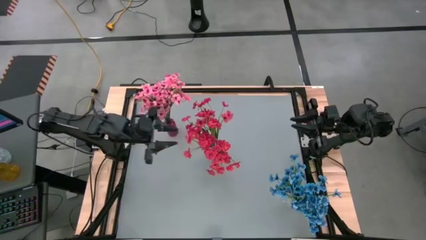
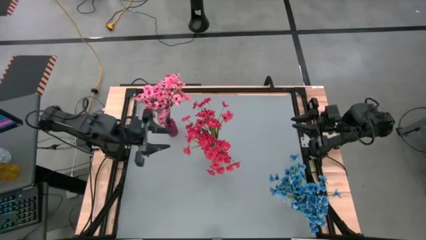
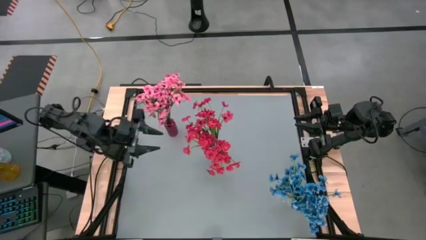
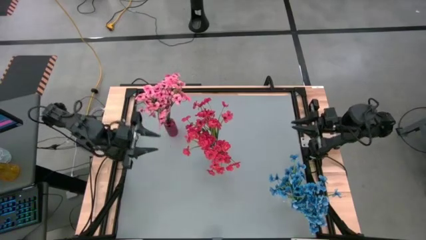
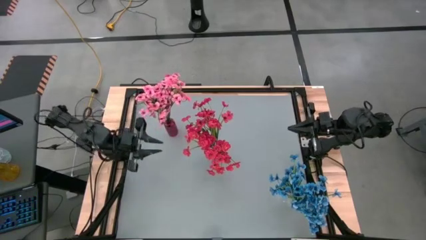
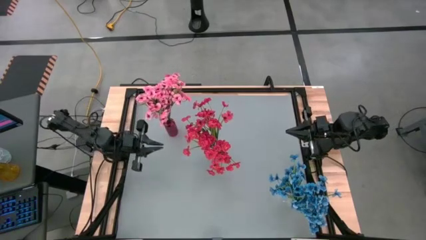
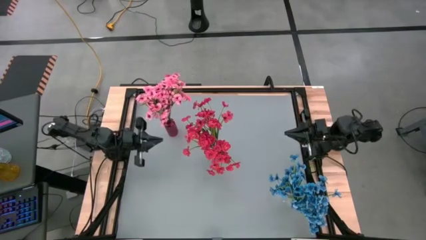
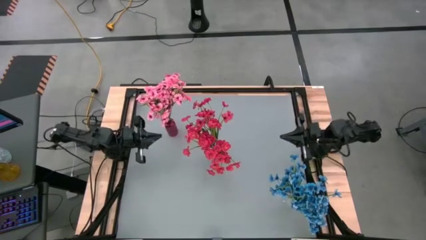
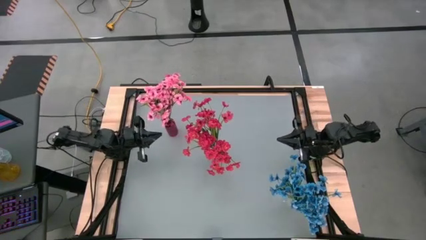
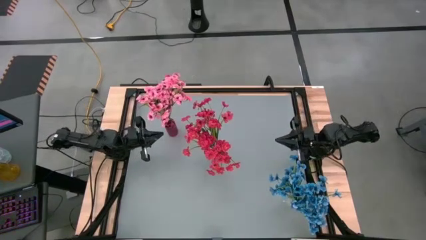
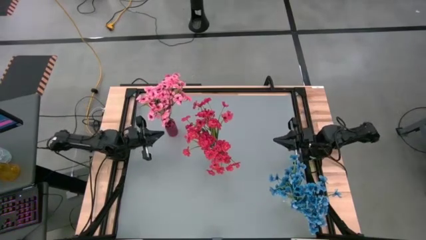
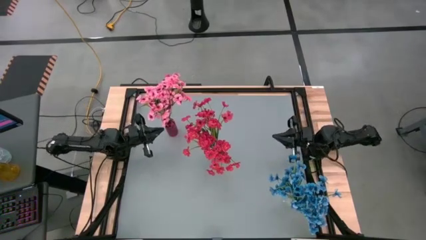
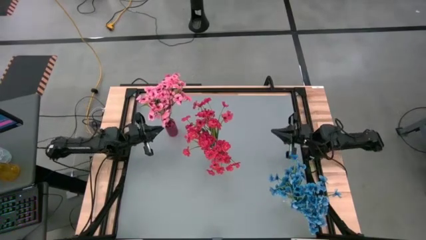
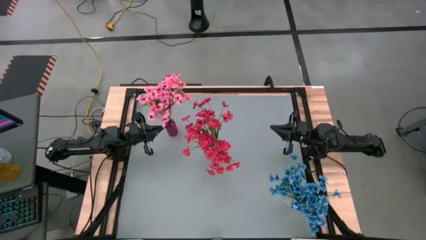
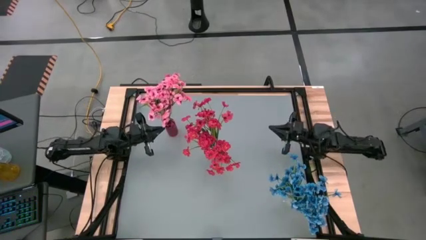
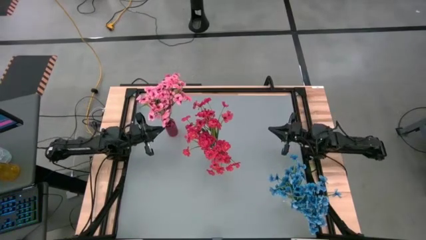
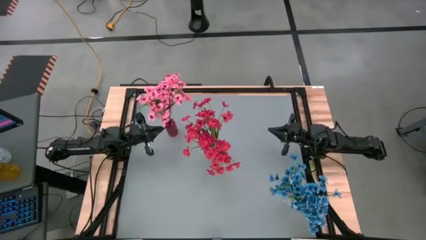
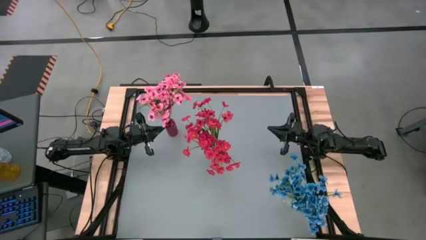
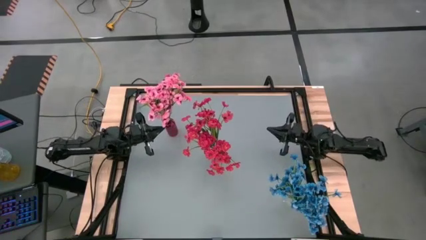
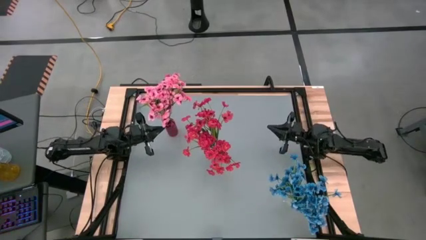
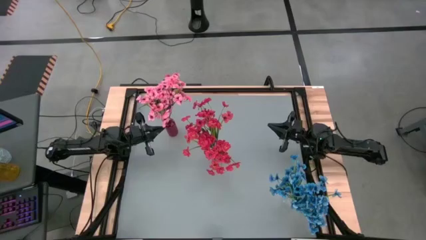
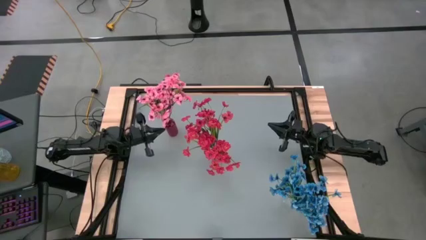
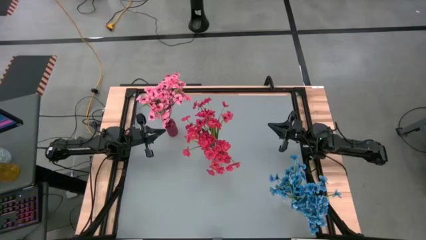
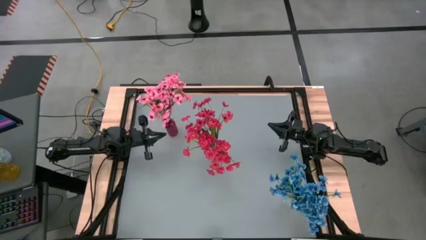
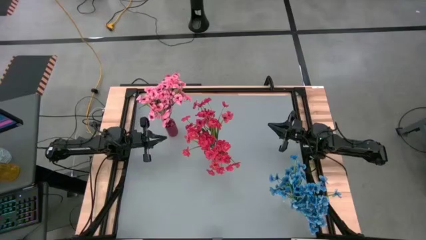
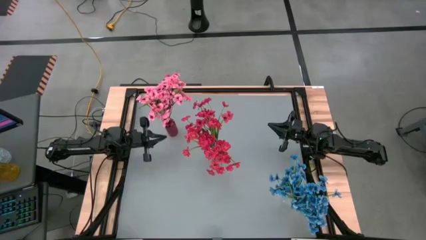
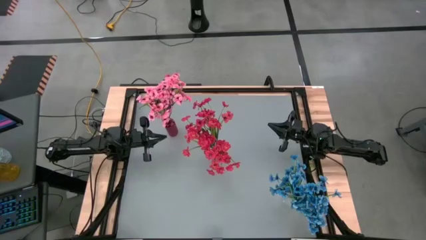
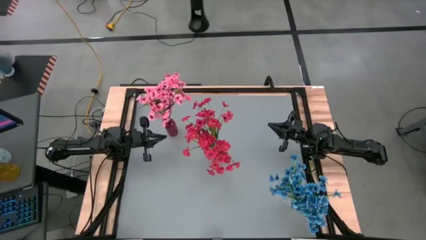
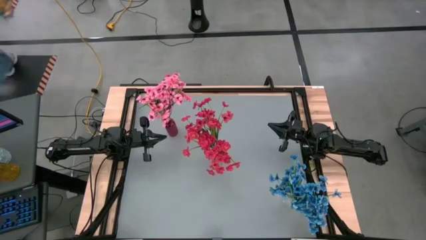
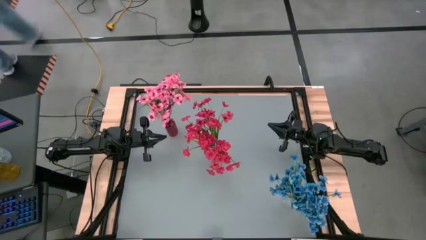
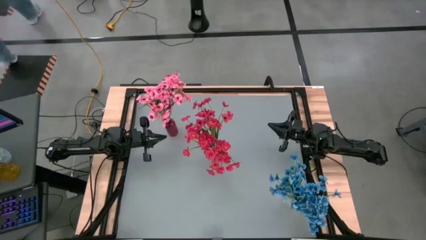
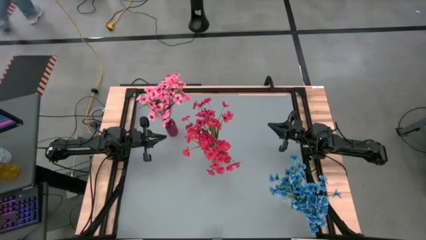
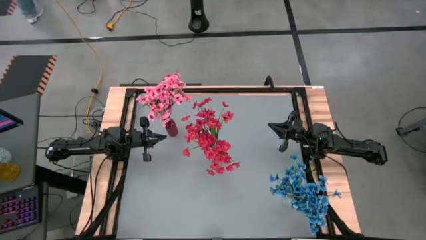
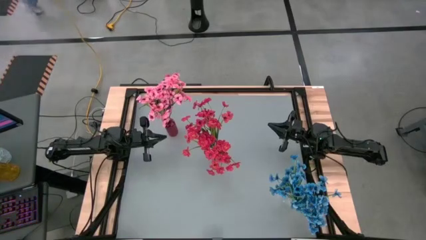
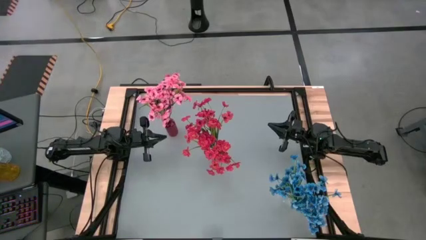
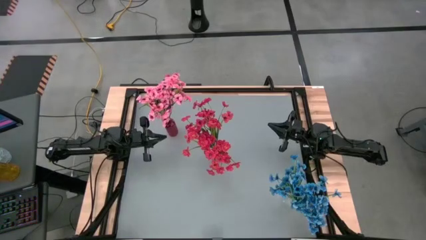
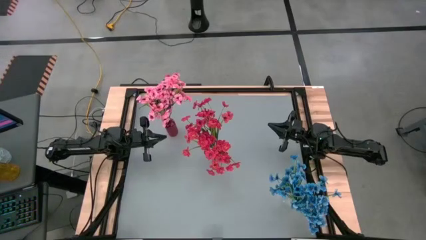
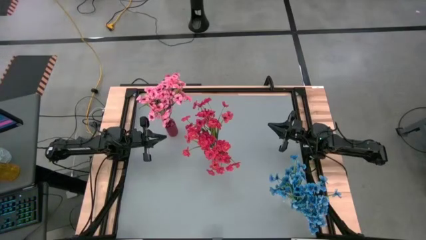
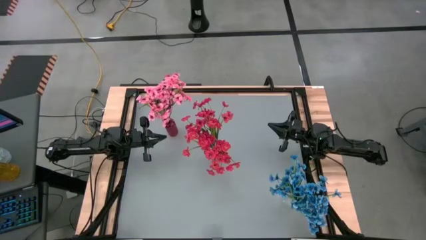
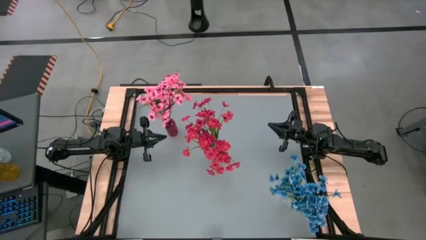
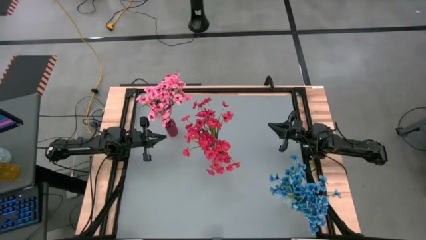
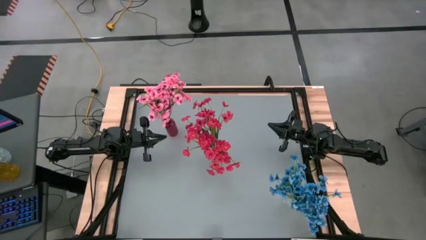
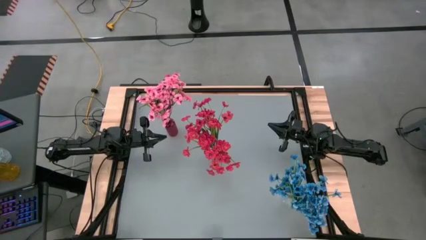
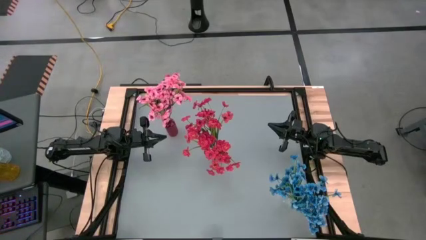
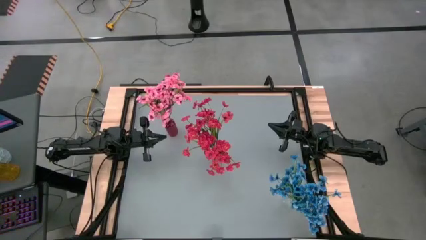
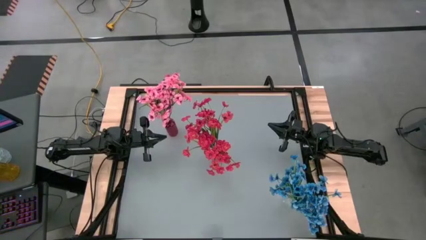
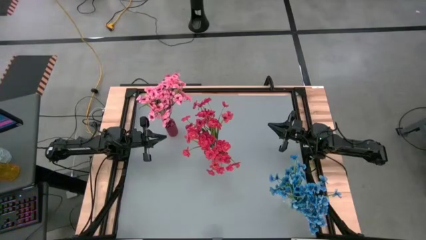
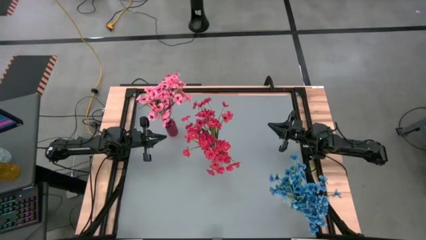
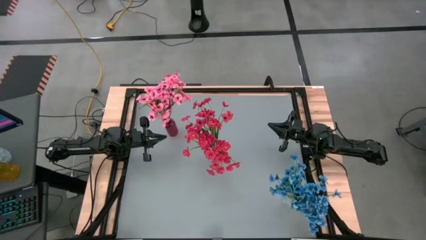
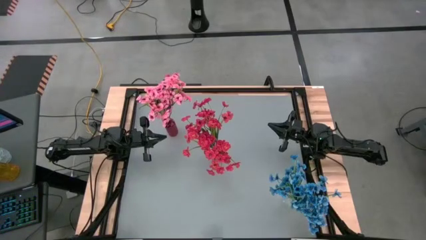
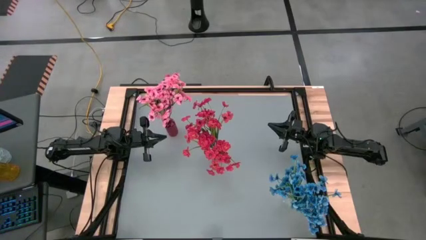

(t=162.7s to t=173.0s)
Task: Sort flowers into vase by color
Return to Home Position

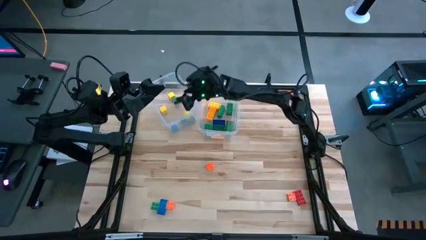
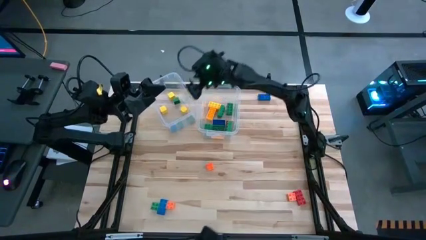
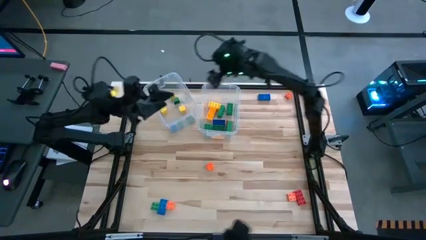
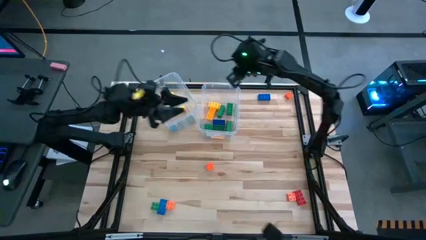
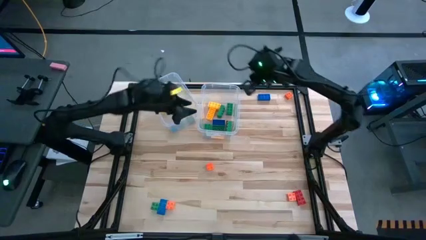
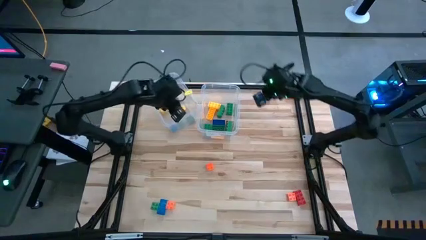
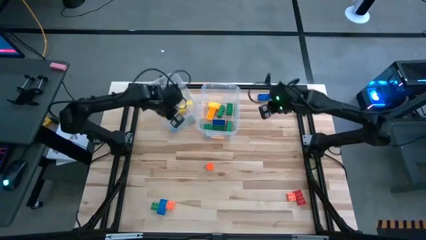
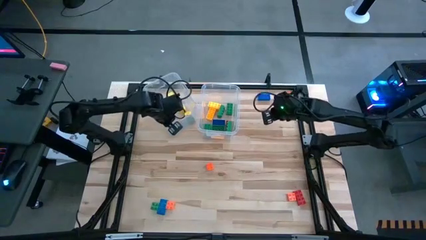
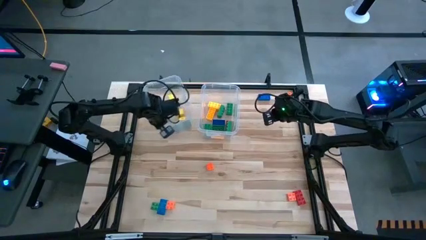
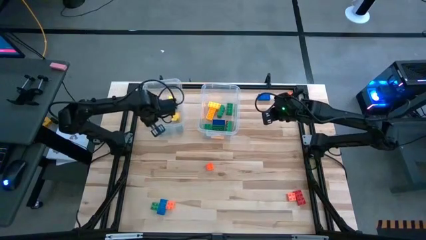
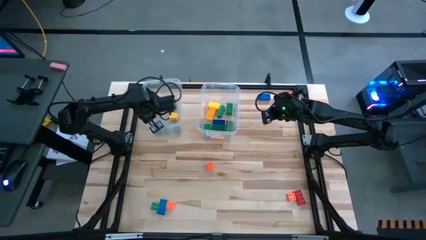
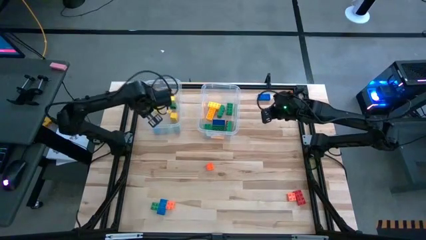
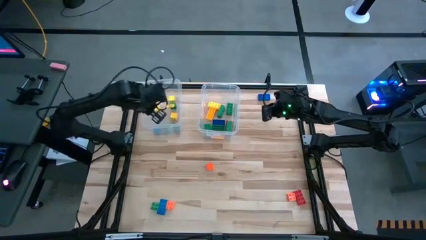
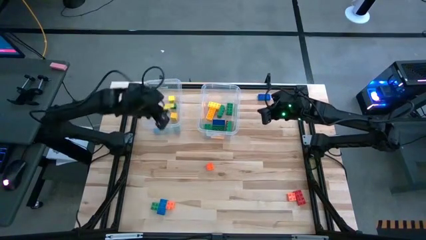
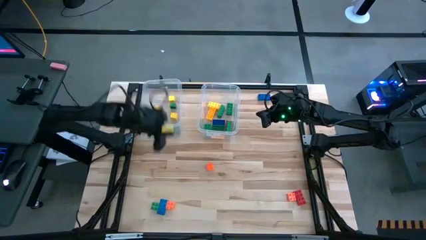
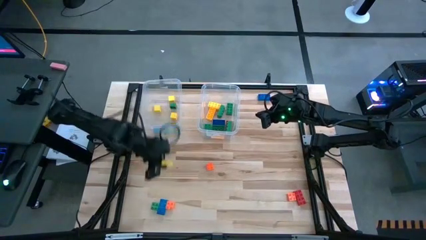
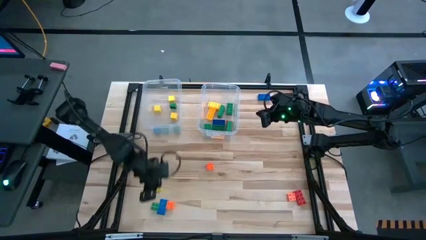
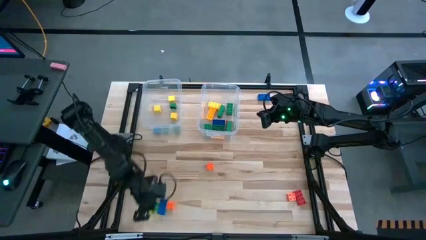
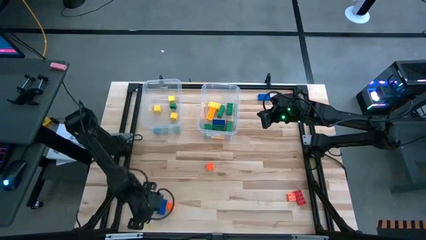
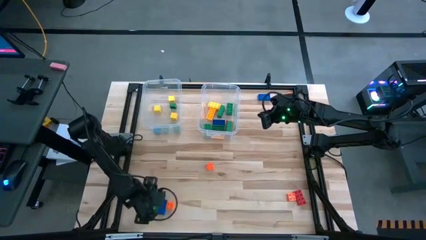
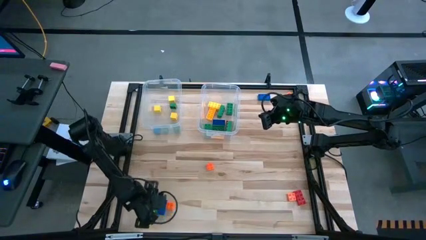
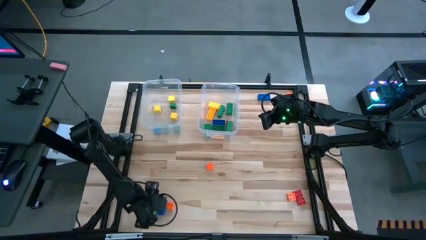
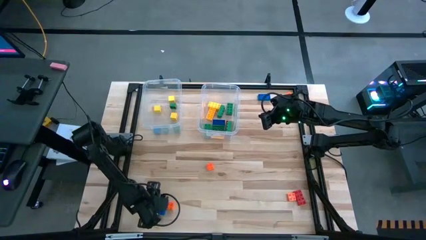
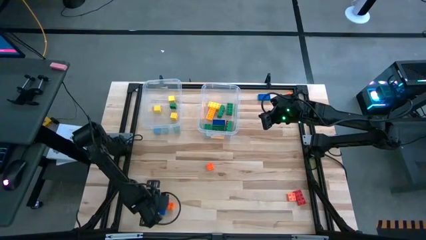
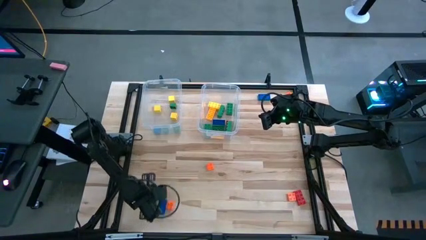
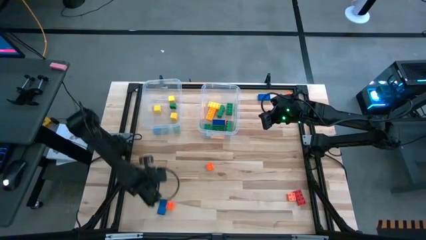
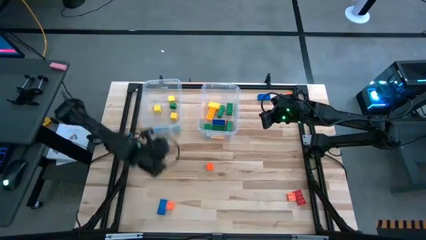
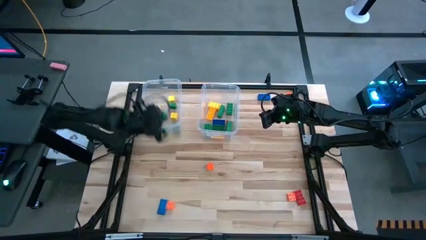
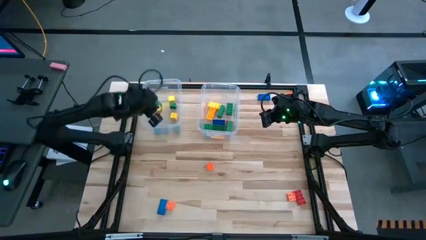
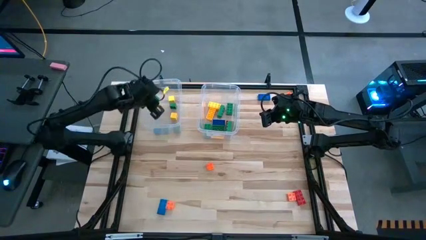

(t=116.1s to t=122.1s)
Task: Sort blocks by size
Put the green small game piece into the left transparent bin
